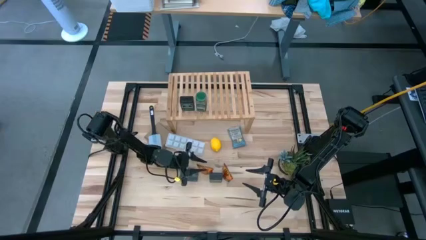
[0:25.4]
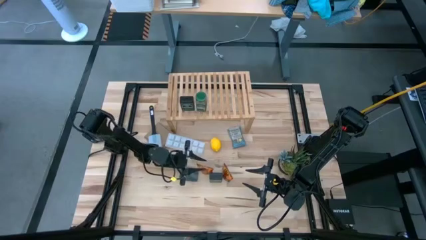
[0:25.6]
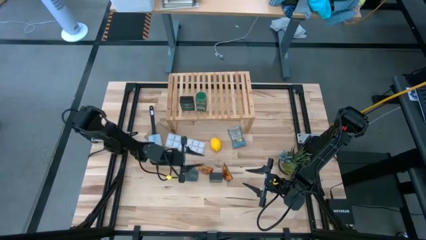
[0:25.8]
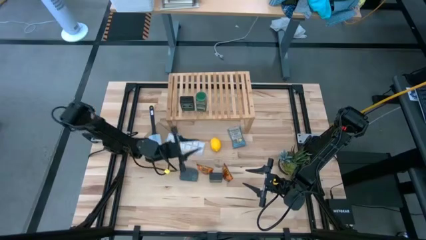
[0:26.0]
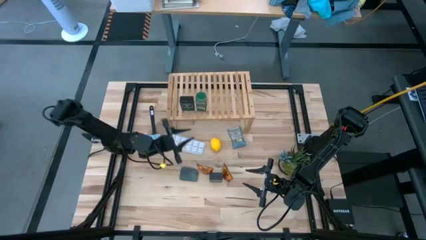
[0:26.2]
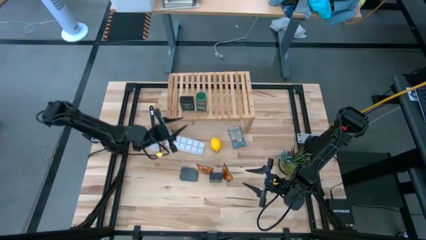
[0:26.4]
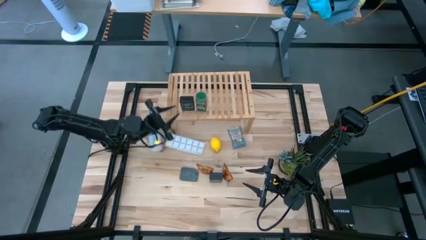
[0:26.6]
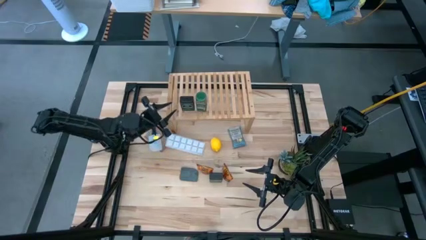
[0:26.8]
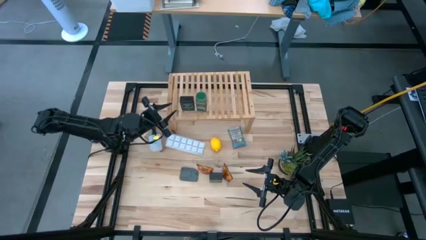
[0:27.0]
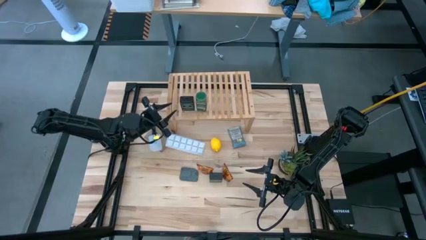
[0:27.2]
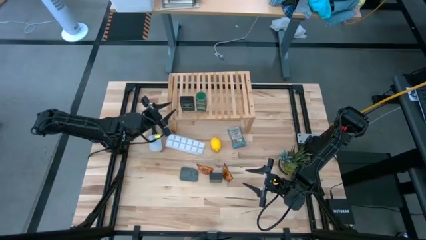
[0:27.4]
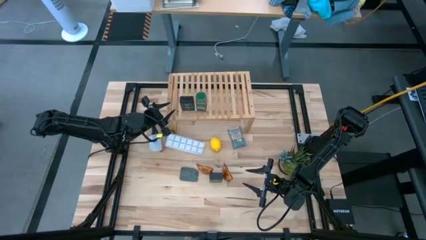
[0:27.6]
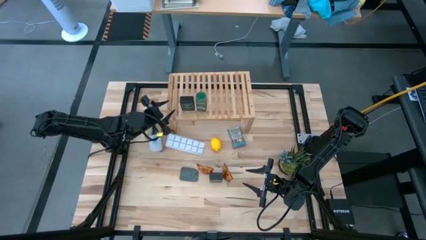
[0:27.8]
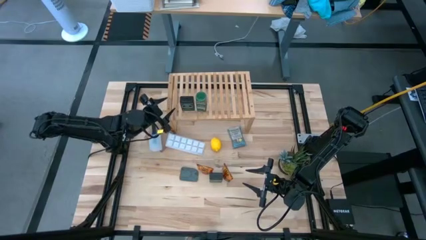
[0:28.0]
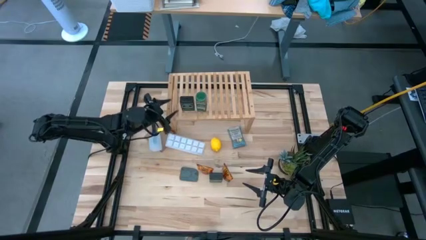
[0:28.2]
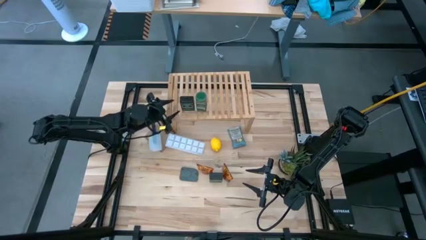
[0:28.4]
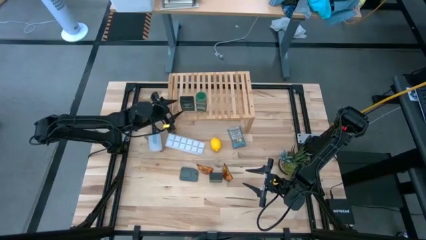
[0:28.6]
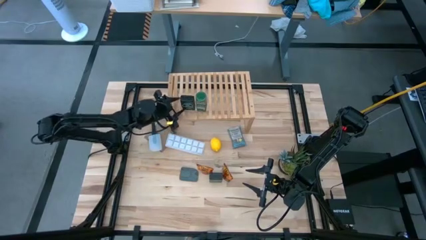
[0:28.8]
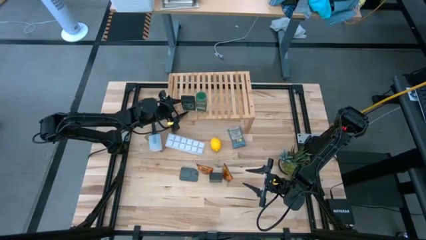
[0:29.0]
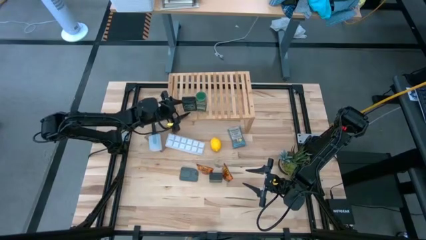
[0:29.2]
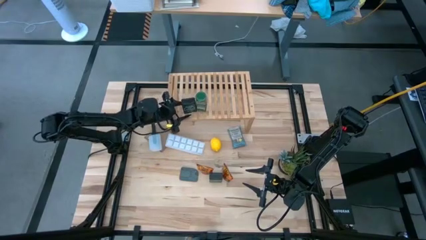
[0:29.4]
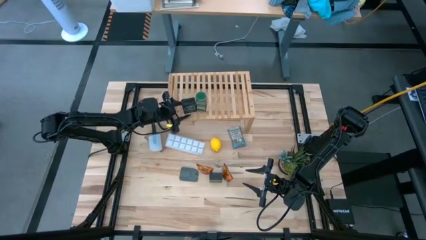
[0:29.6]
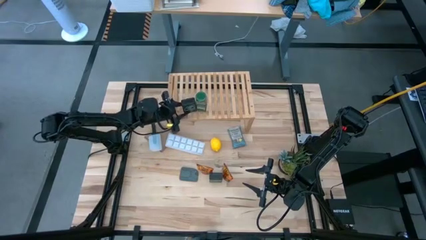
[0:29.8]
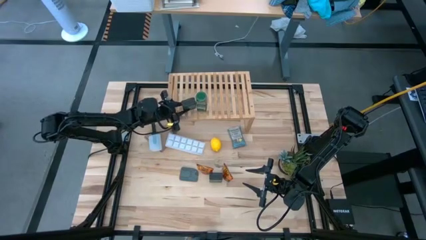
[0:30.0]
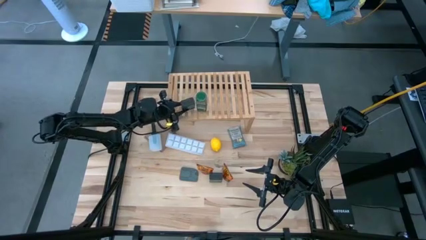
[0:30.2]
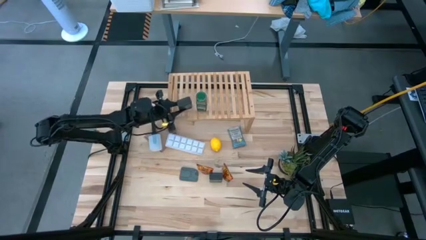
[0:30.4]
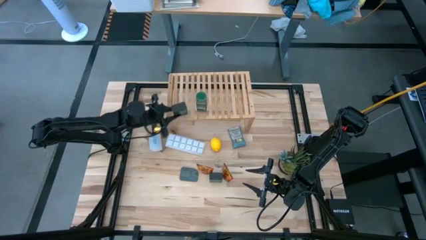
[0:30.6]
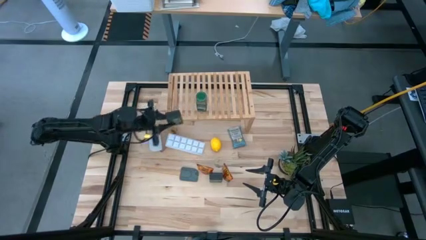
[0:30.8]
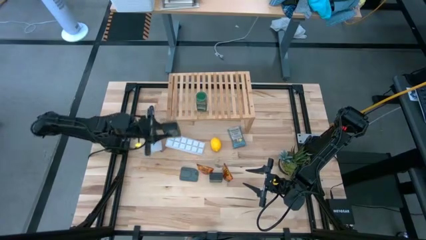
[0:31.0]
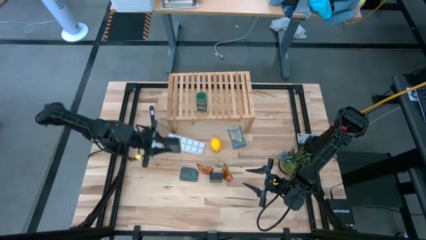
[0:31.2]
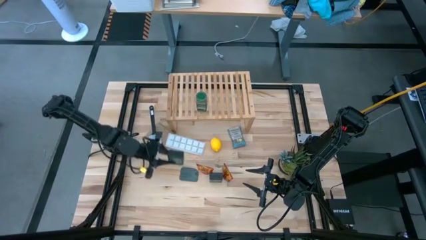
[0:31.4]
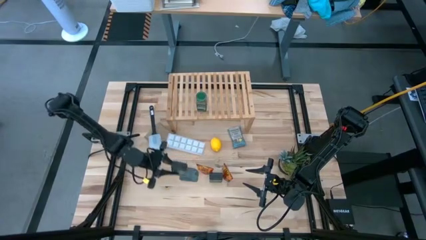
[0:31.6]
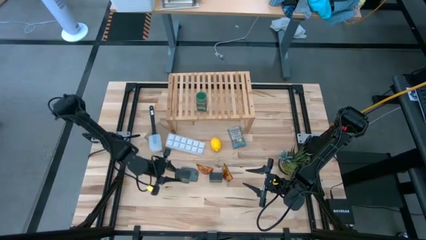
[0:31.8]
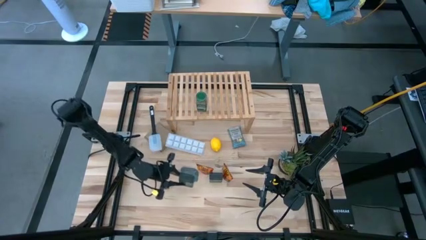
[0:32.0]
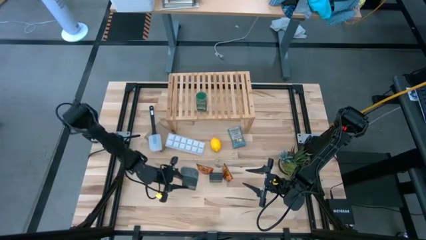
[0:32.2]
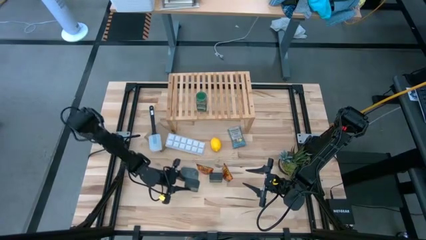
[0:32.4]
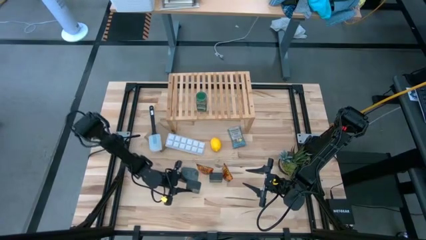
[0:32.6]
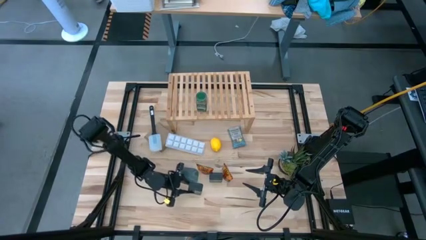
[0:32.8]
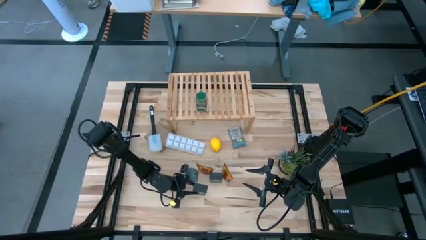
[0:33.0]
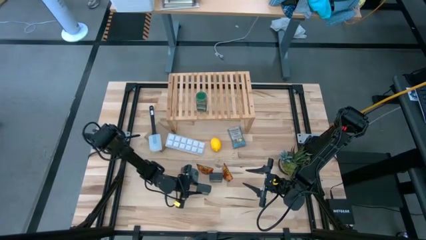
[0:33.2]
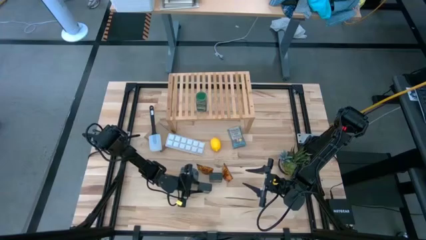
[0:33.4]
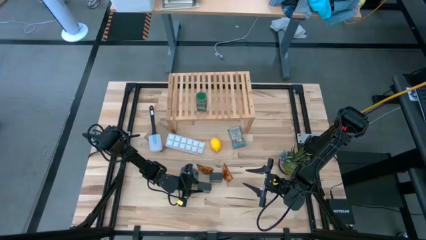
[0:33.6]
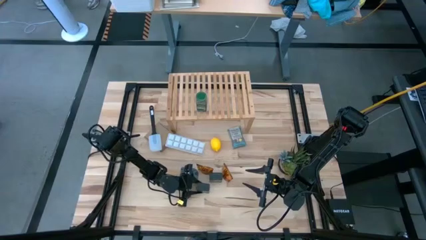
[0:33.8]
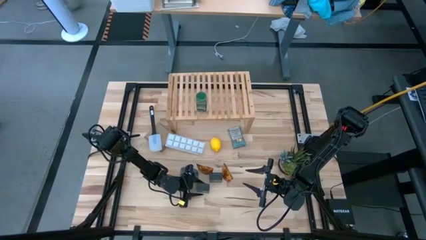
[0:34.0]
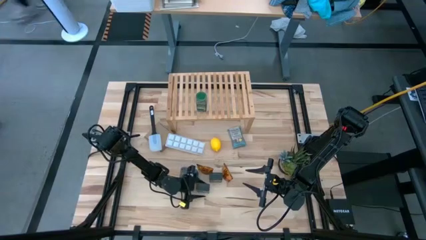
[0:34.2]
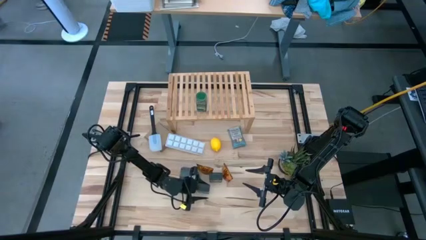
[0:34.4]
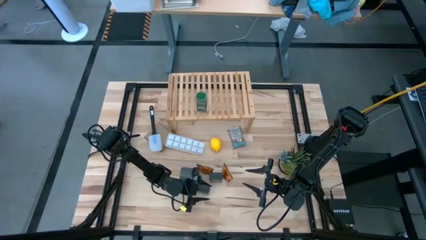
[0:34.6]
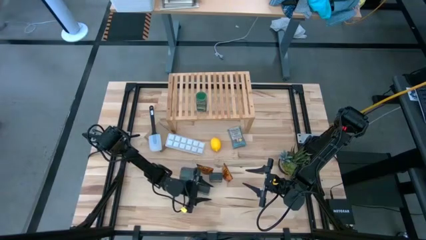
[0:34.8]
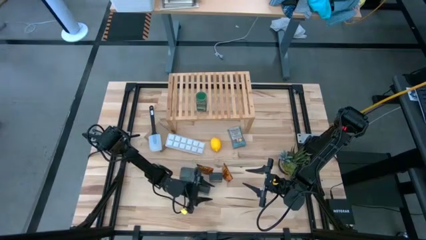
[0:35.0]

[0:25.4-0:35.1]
Task: Shelf spices
Remove the green seasoning container from the shelf

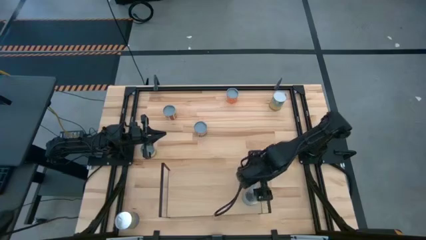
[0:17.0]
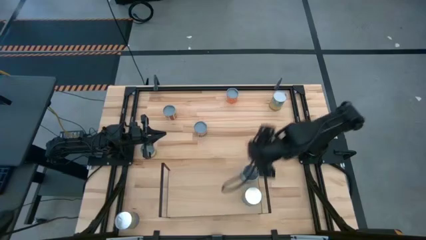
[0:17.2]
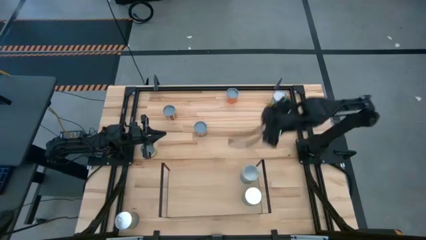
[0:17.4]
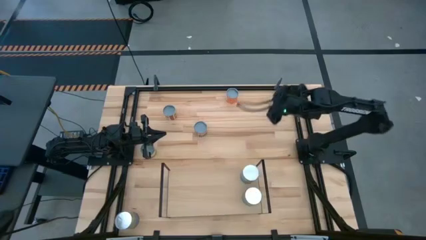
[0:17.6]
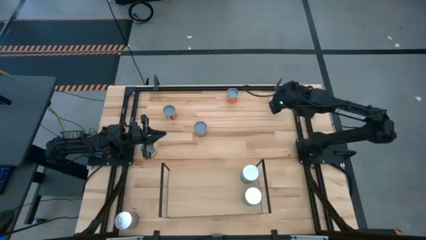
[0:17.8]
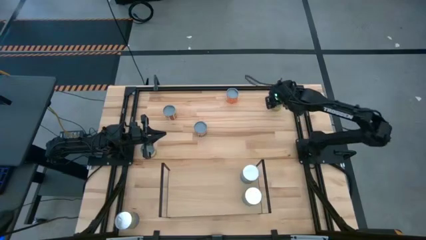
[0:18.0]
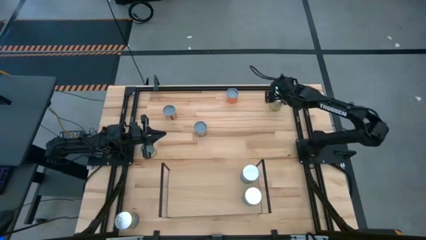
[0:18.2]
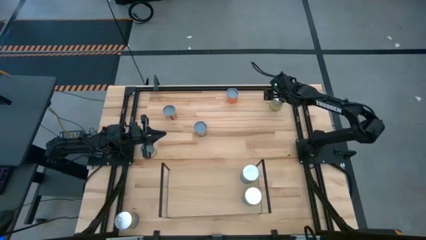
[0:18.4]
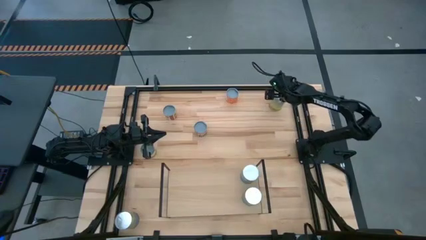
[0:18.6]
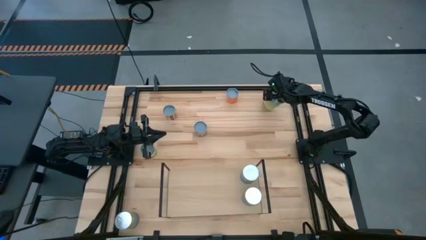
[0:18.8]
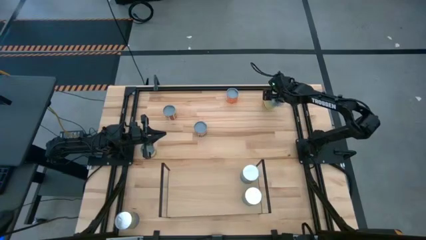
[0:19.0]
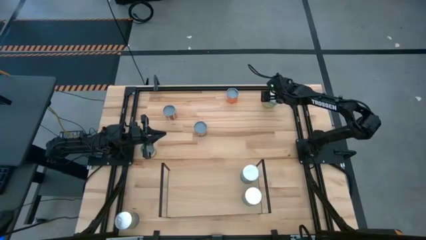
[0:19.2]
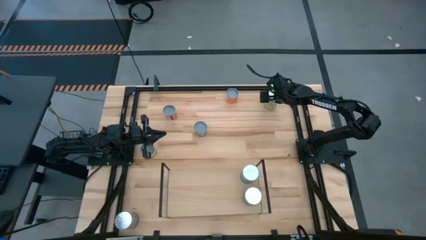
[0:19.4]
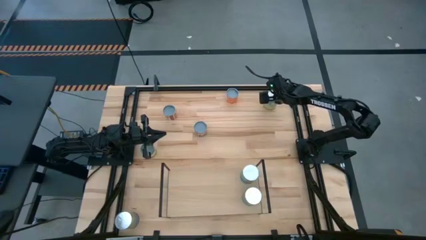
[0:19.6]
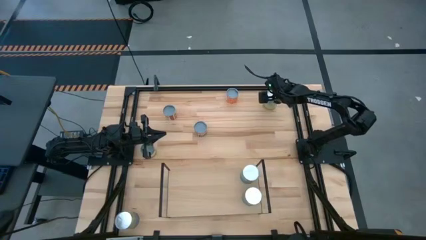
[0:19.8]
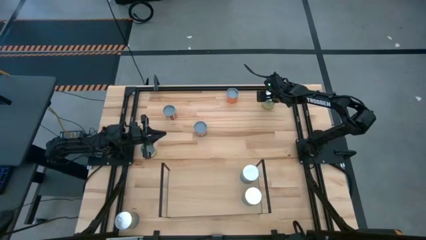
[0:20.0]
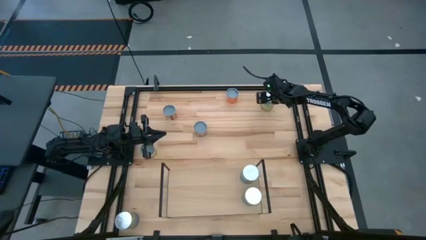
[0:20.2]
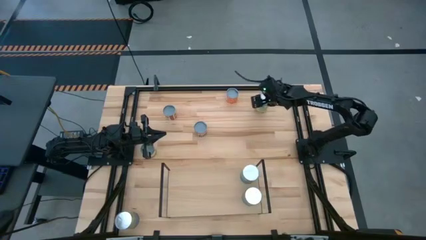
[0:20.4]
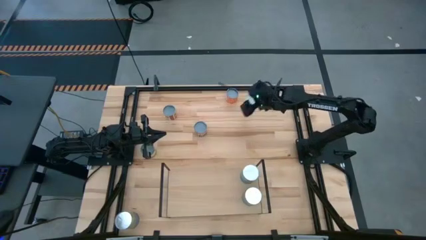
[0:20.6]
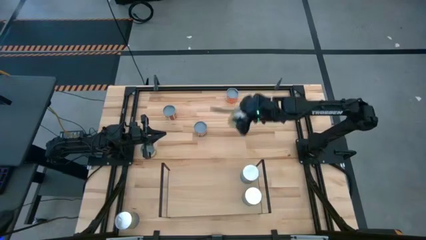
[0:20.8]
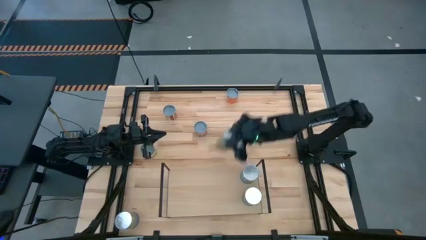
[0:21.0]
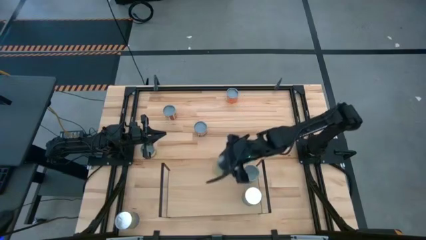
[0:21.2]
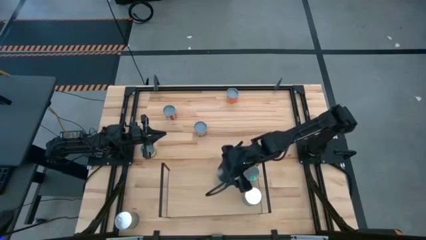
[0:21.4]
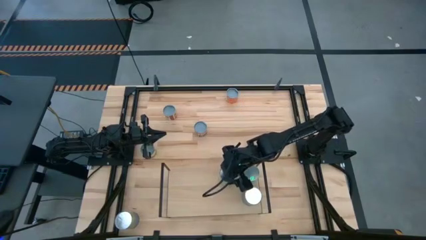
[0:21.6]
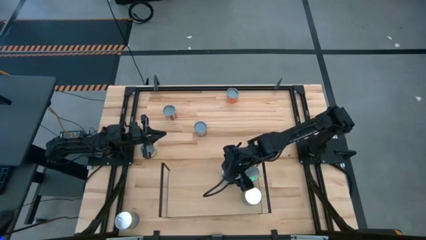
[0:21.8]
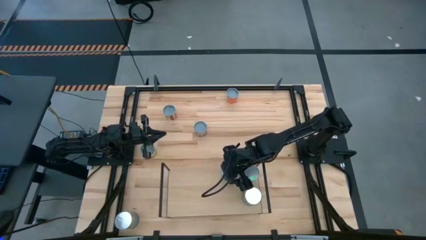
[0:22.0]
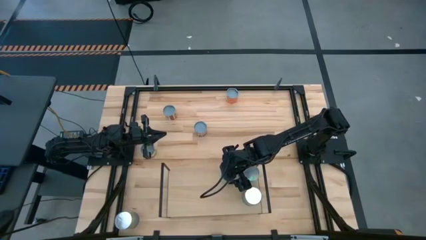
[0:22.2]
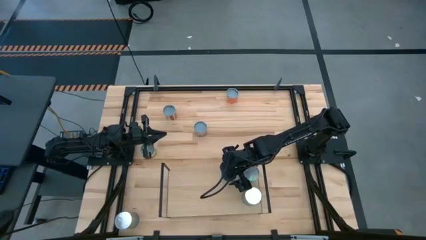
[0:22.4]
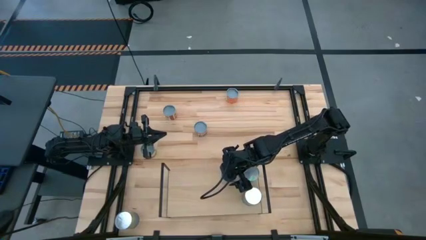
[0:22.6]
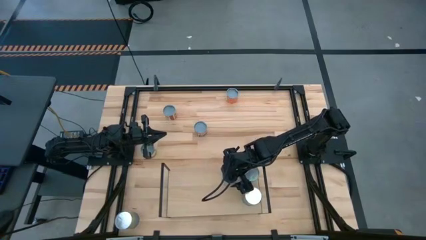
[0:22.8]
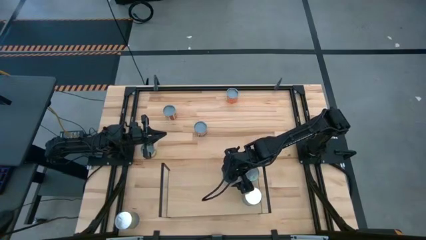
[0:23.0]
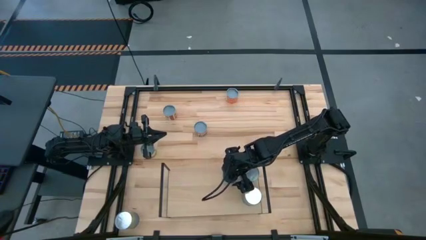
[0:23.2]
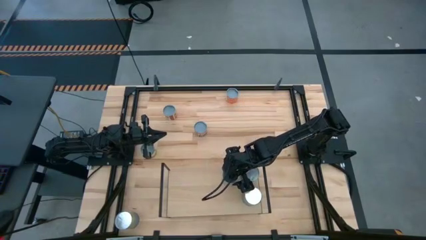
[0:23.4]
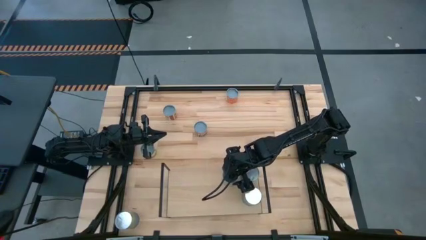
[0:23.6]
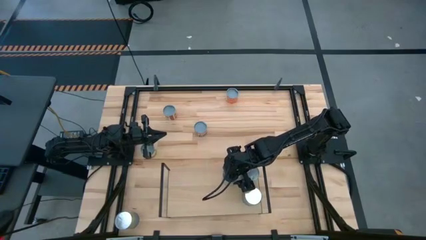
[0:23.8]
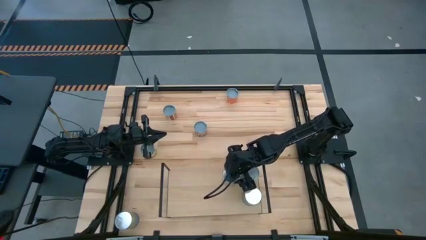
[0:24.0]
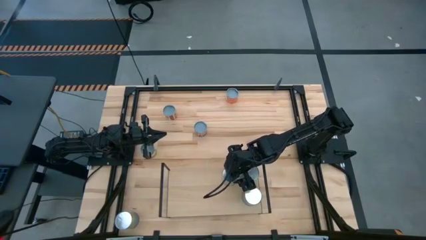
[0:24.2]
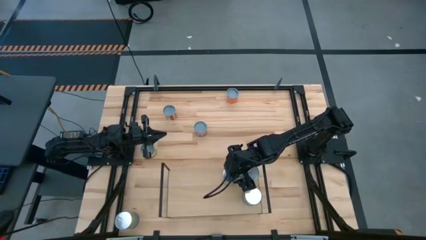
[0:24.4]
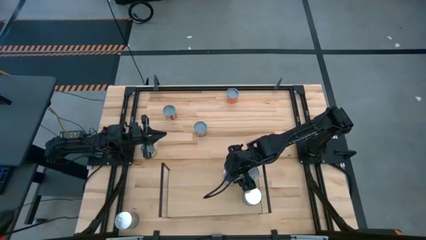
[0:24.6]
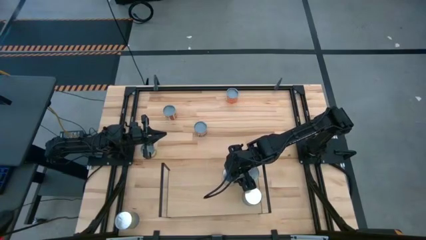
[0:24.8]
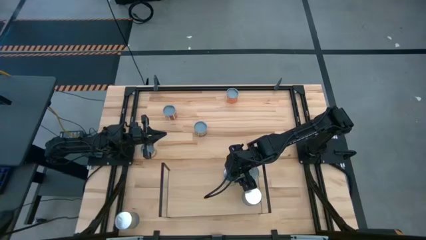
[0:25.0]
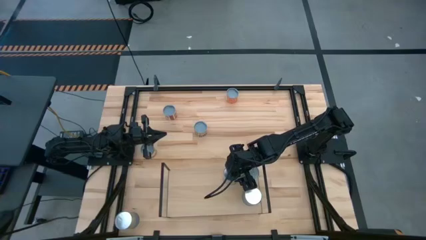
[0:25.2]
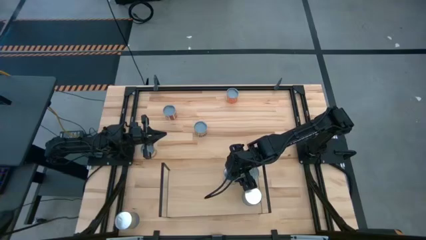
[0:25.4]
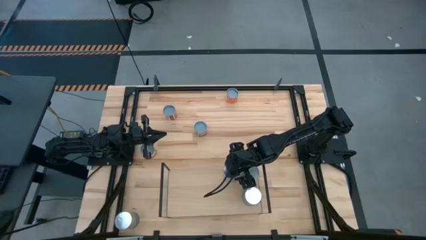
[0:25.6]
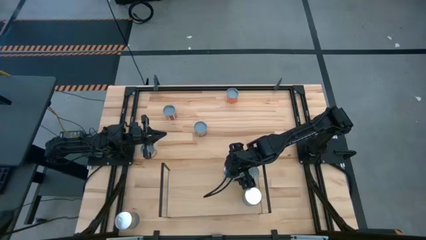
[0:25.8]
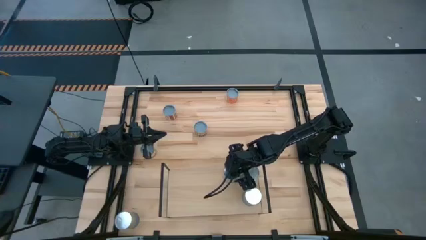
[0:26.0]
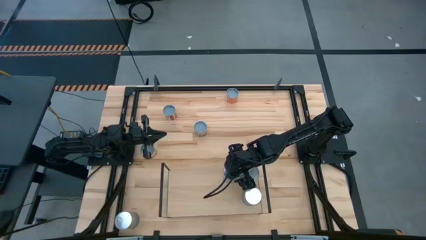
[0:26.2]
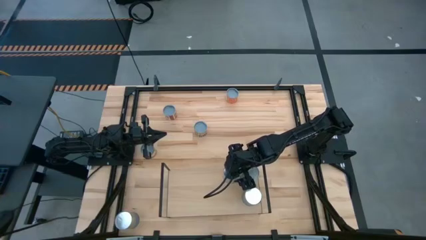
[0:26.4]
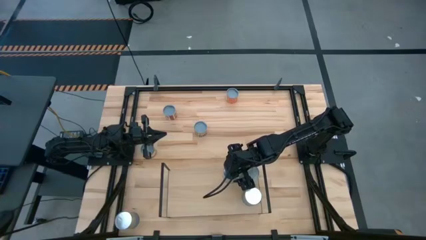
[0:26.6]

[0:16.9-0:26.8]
Task: Pick and place cans onto a shelf
Put the canned carrots on the shelf
